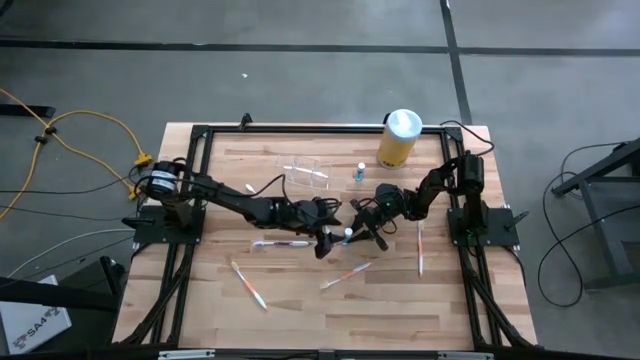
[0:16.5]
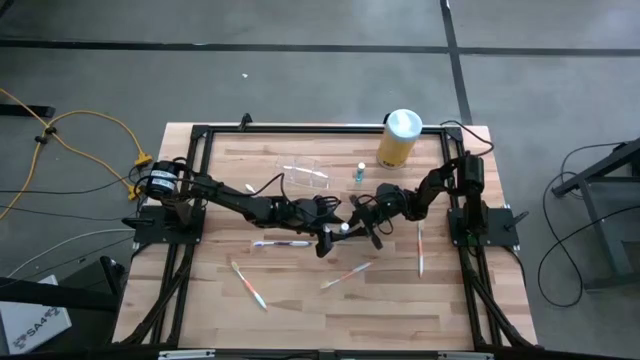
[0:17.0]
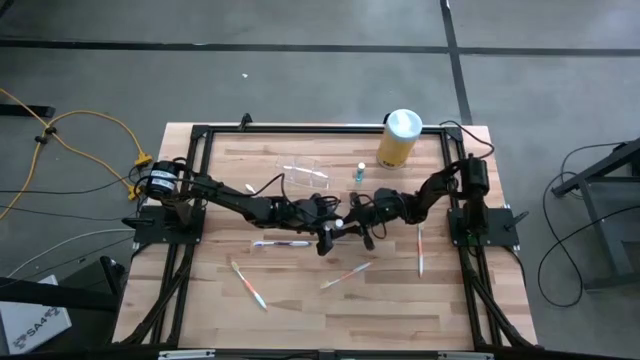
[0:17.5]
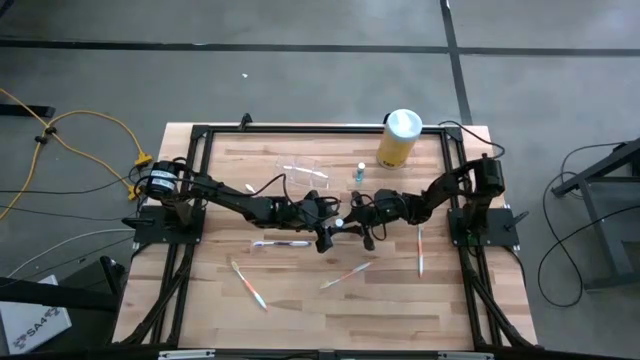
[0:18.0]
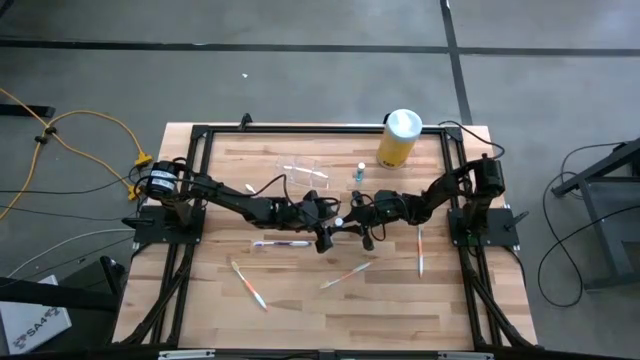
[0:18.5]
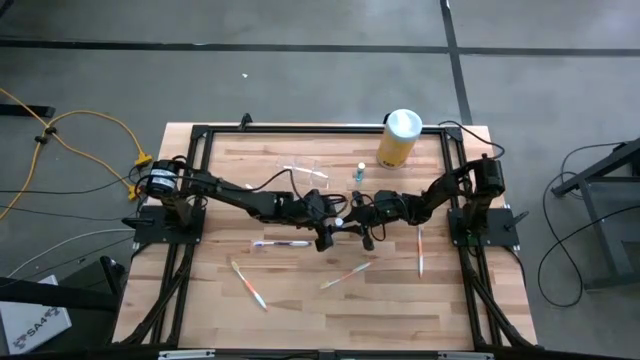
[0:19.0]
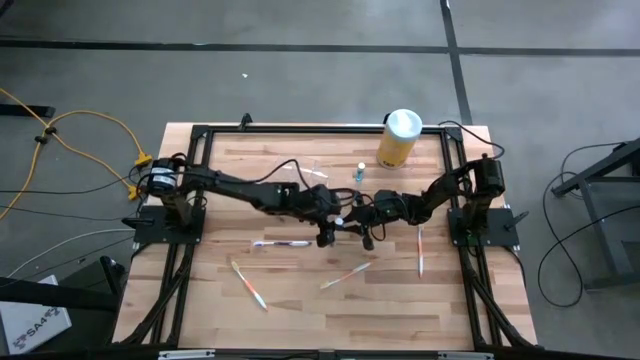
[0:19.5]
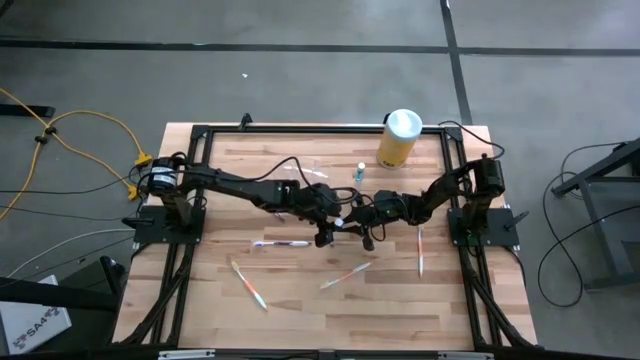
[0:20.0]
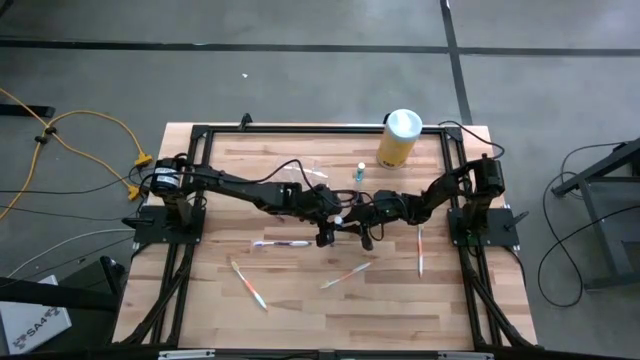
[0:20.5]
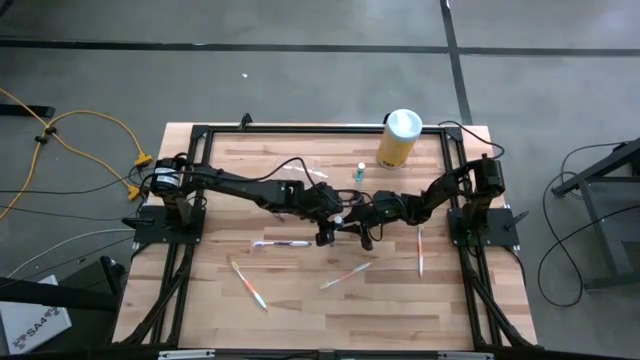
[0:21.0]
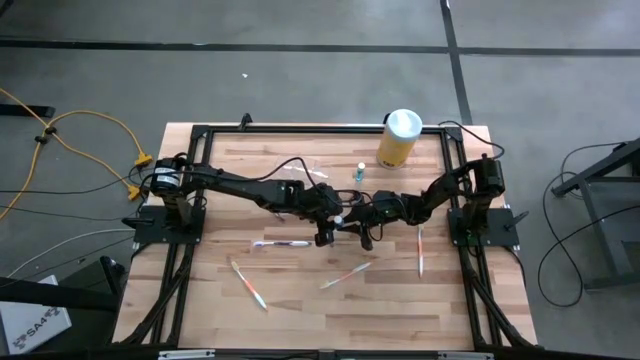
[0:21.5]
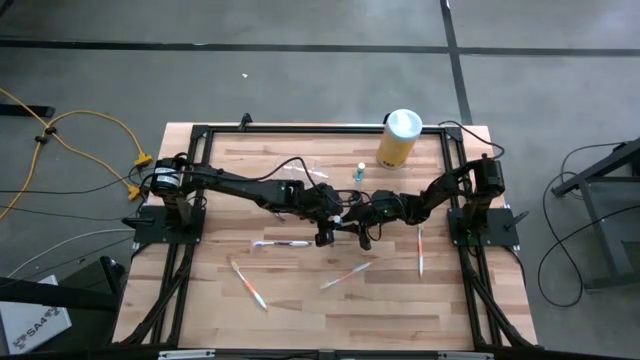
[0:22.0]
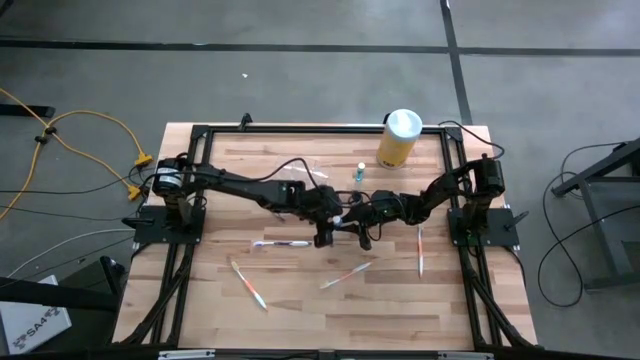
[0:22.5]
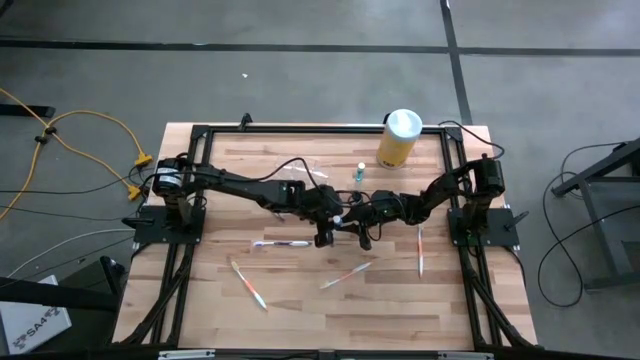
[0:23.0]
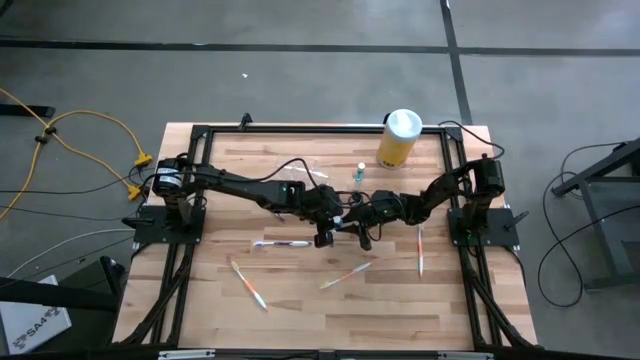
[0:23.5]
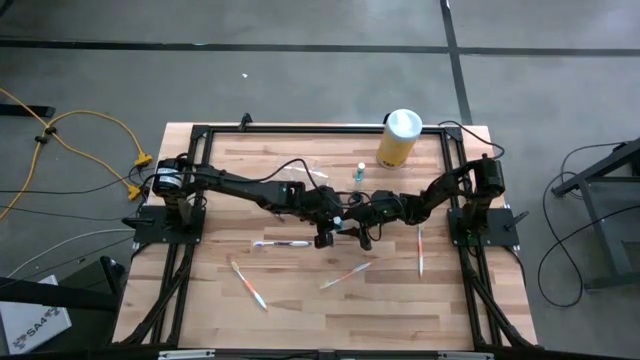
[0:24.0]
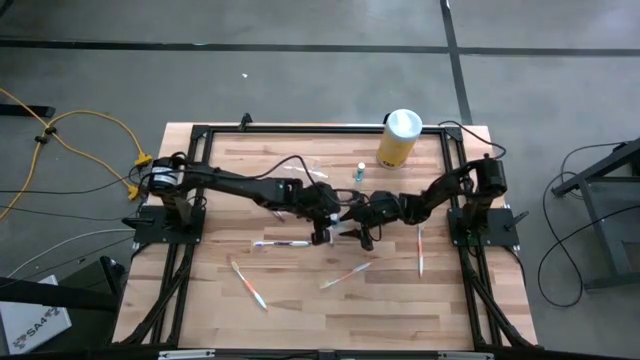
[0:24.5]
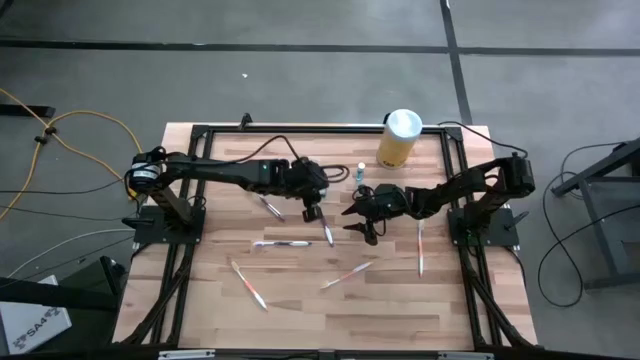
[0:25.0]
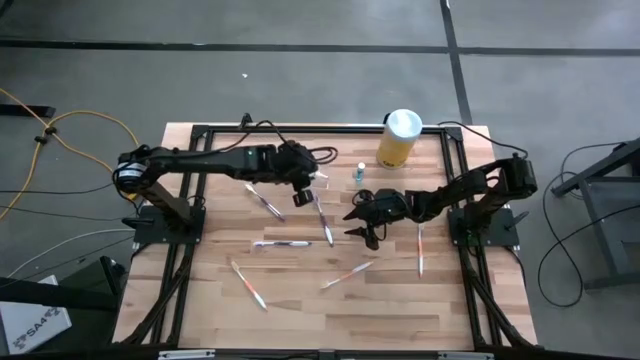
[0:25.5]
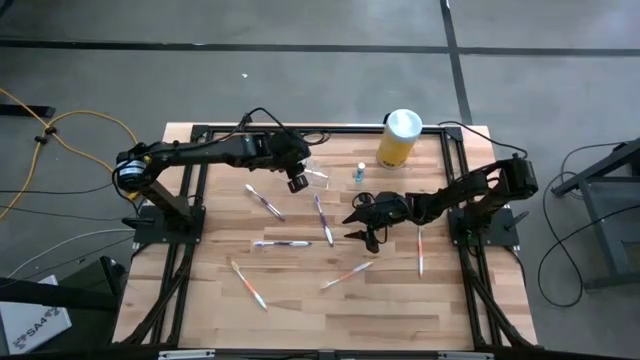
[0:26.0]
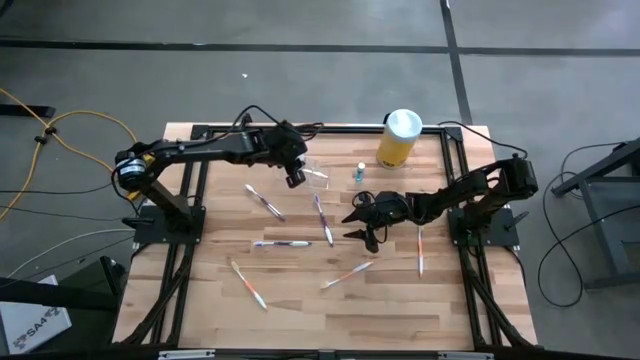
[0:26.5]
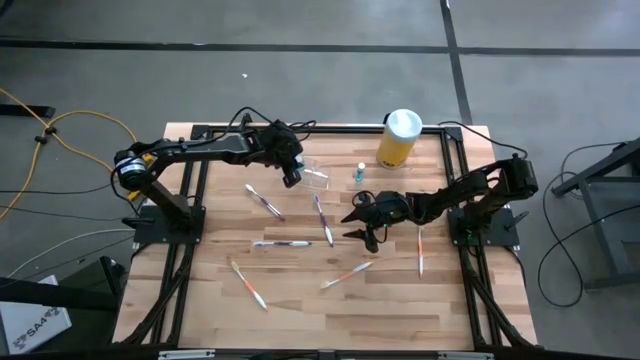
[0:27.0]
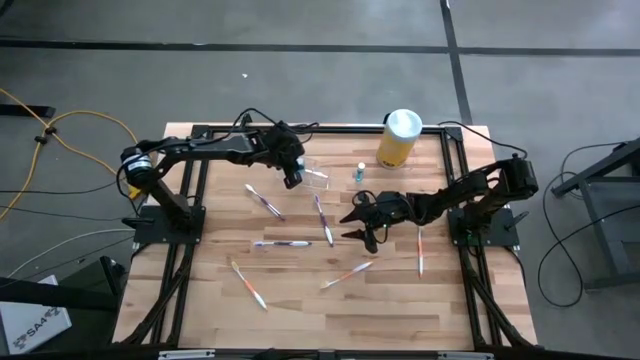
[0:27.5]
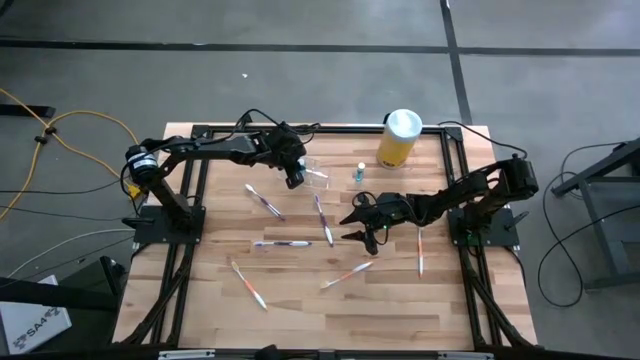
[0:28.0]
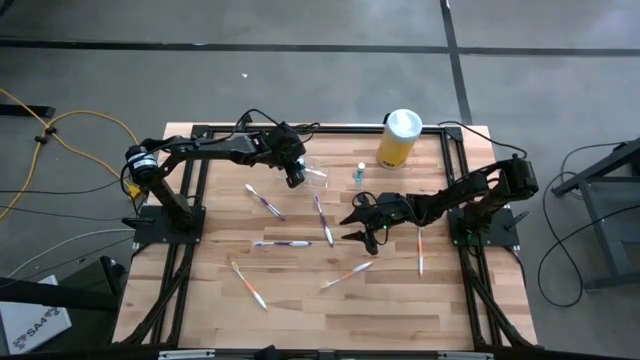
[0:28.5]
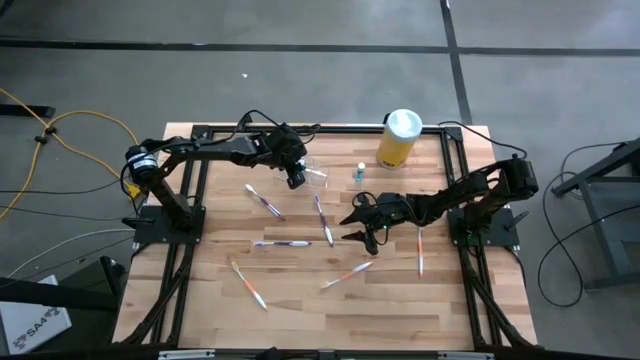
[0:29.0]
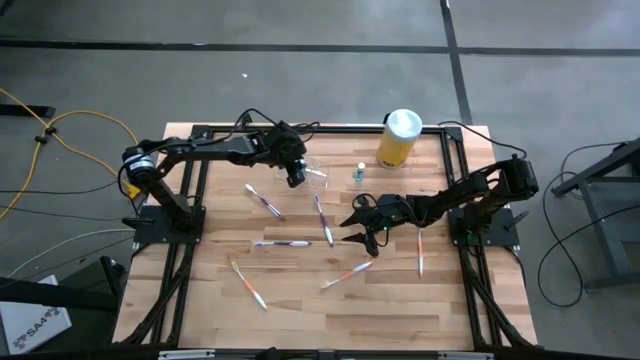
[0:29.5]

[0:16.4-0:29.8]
Task: Pick & Place toothbrushing station
Put the bottom blue mouthwash into the transparent organizer

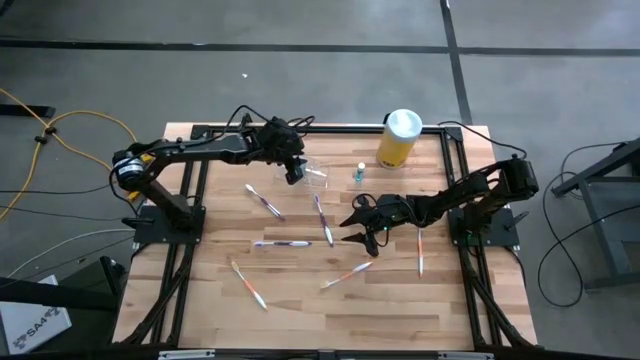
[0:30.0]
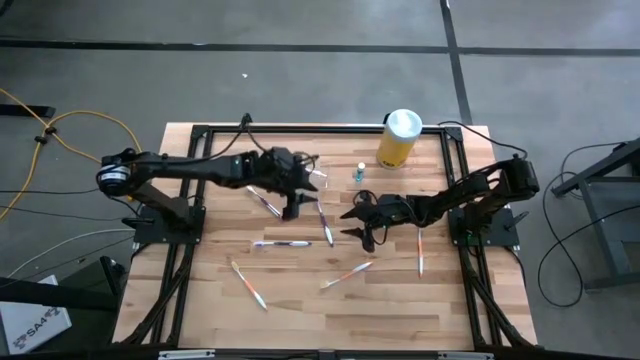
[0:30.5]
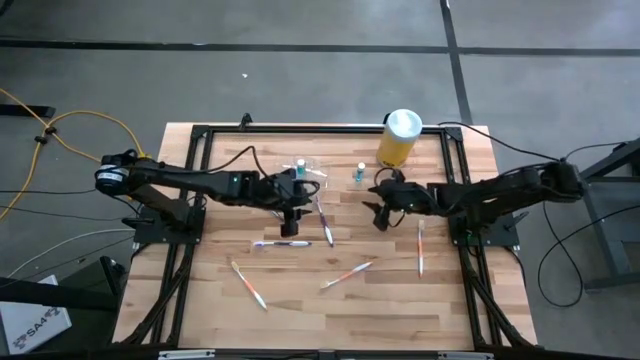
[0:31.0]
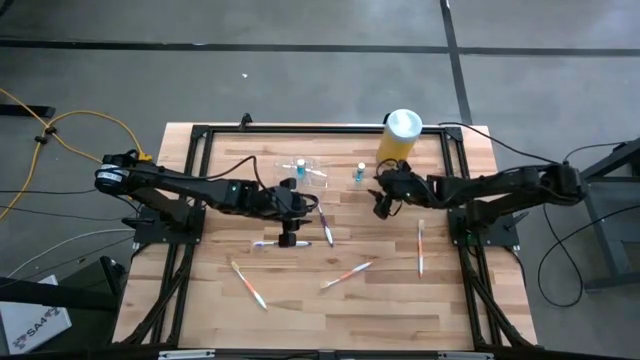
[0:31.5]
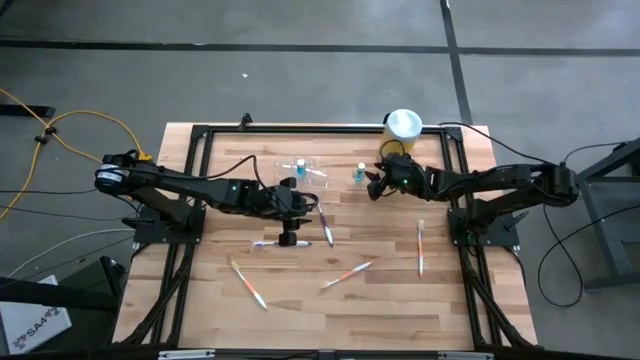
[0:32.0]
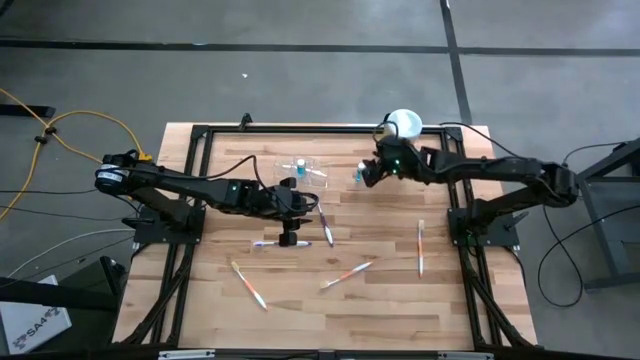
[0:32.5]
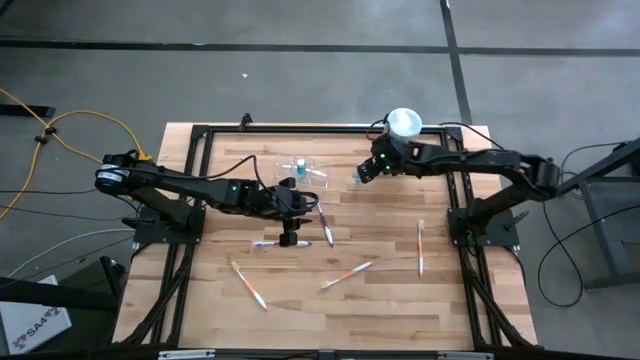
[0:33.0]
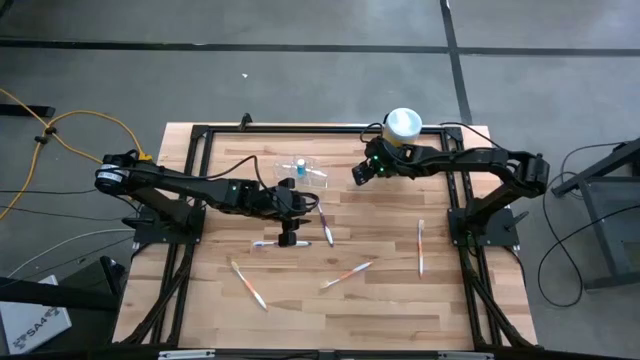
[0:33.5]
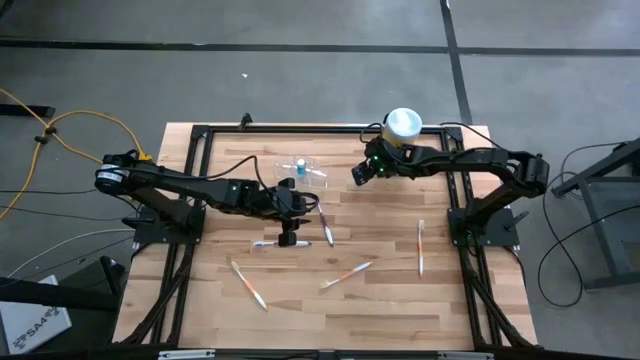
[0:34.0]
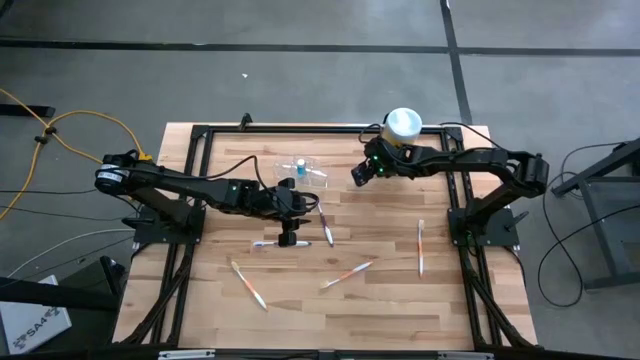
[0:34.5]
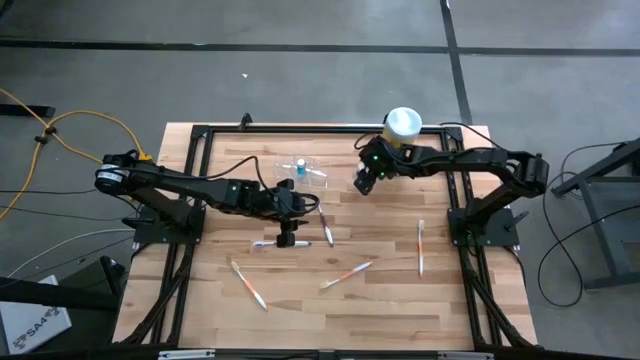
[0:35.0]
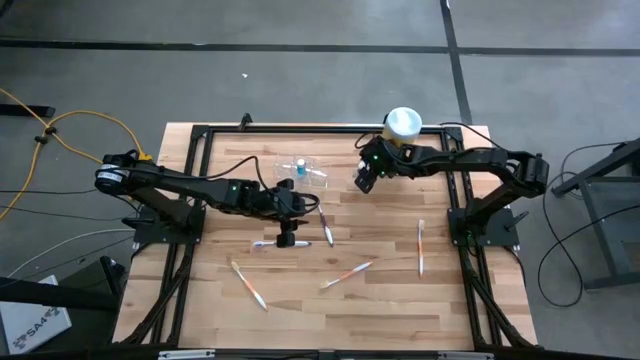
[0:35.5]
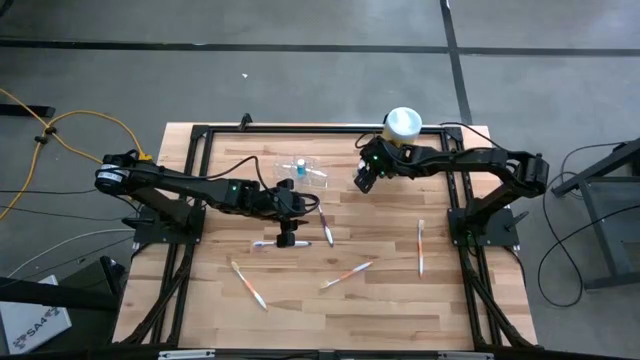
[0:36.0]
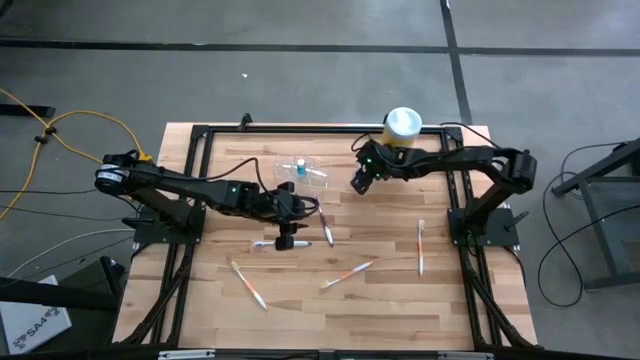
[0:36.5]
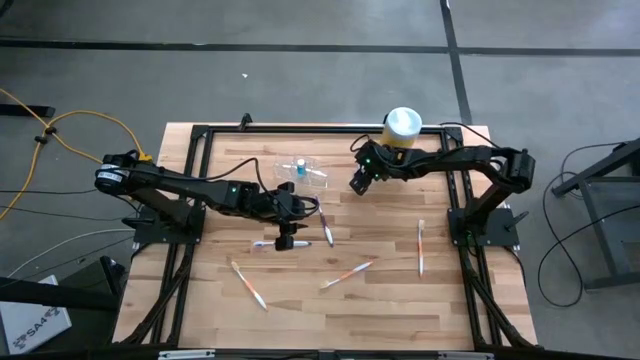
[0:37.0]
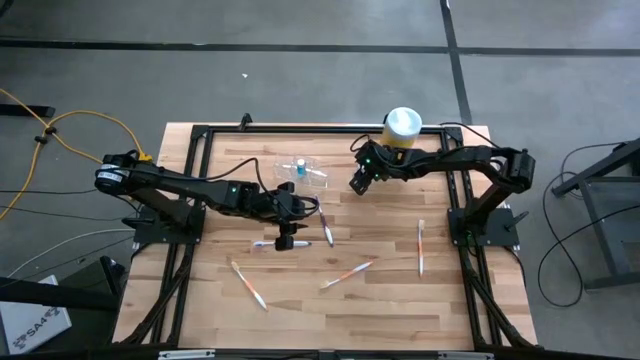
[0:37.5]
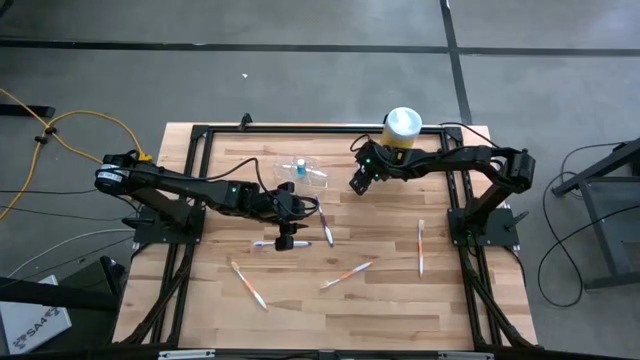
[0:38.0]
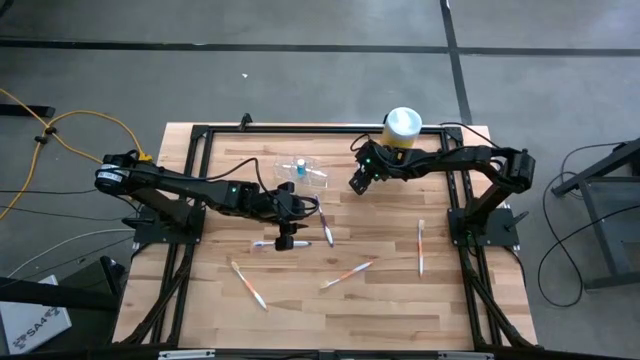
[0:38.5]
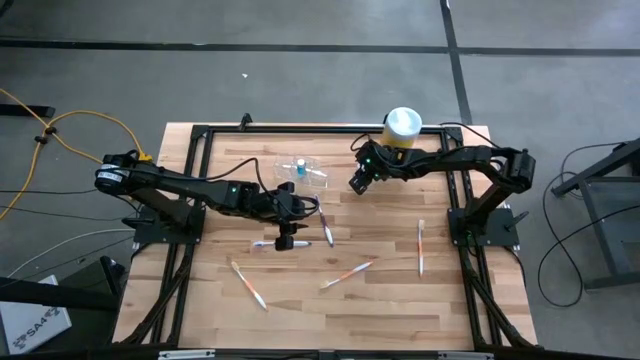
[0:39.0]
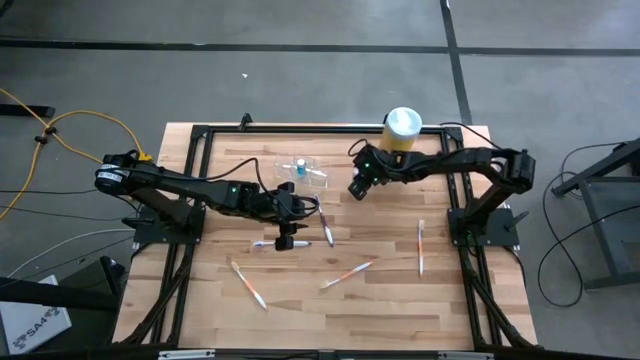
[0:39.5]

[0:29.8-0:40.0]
Put the blue mouthwash into the transparent organizer
